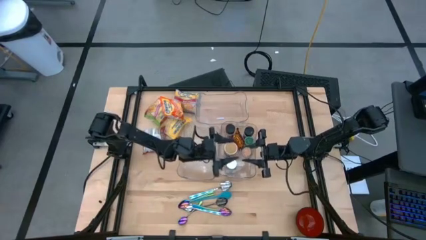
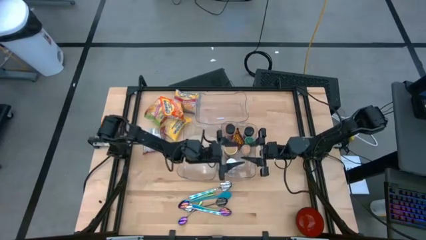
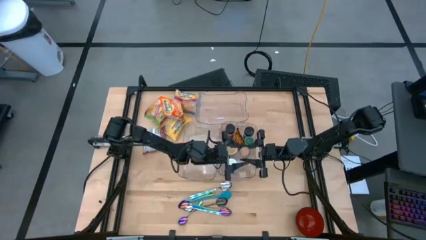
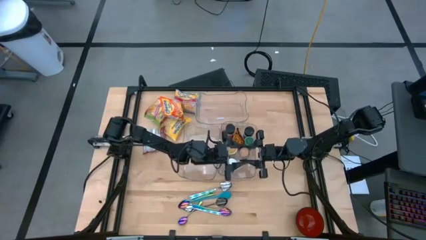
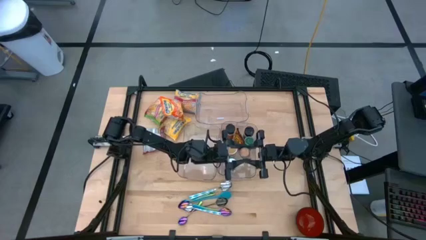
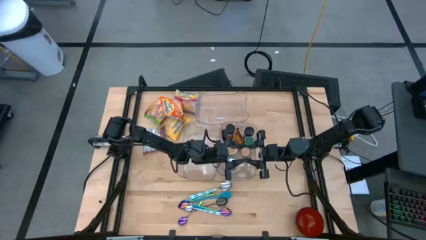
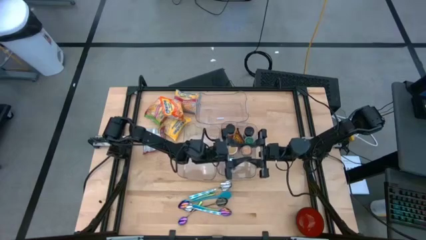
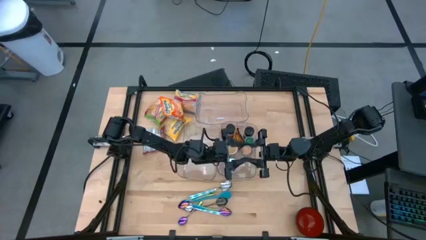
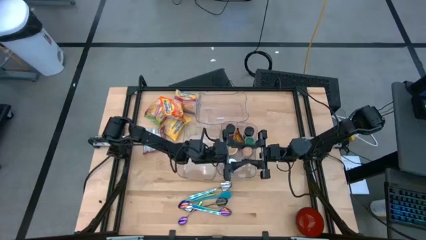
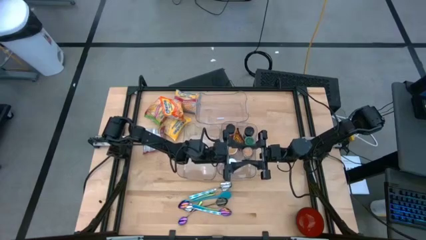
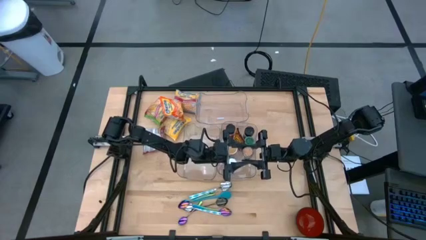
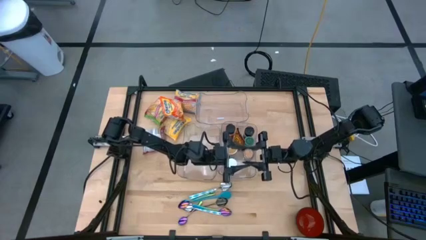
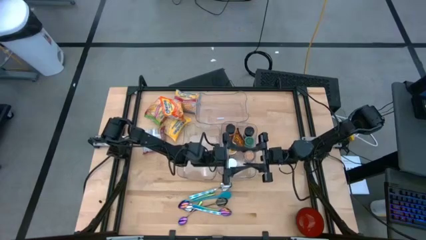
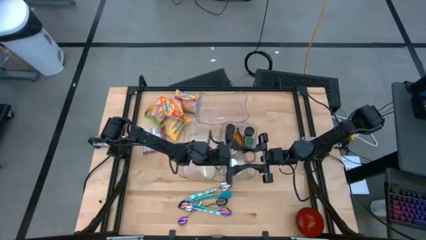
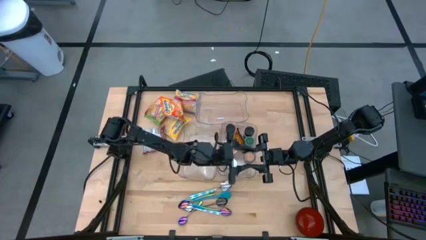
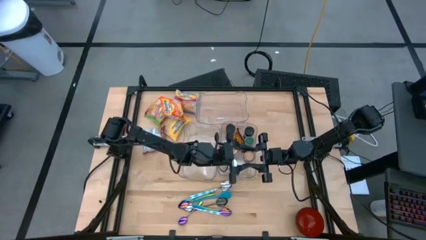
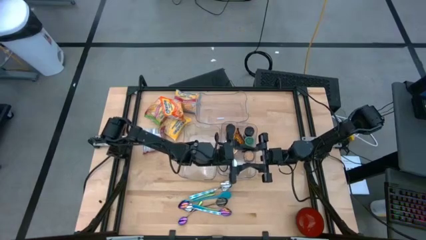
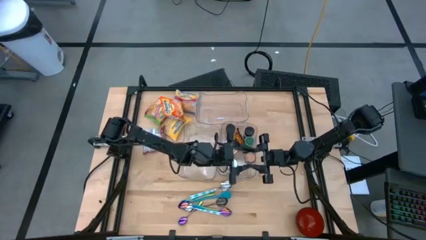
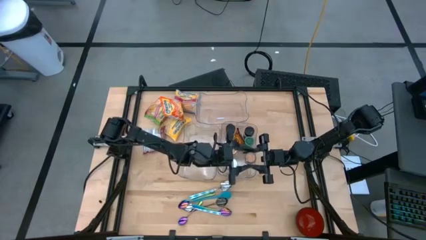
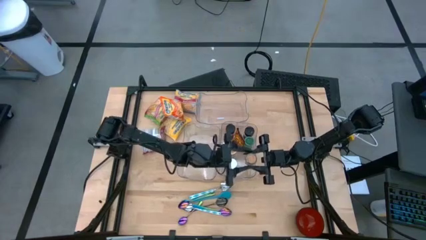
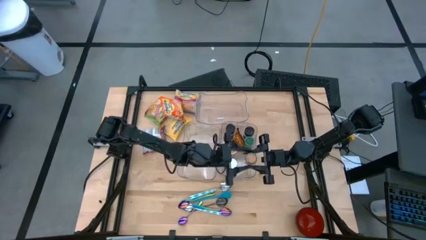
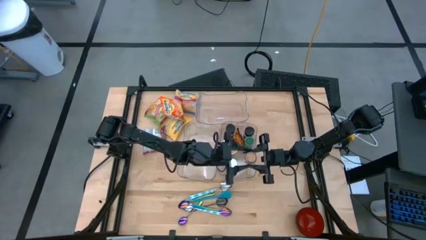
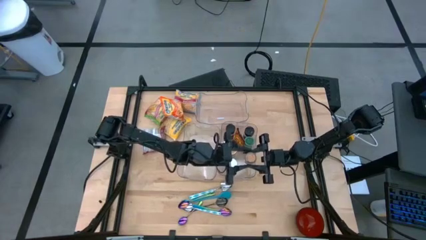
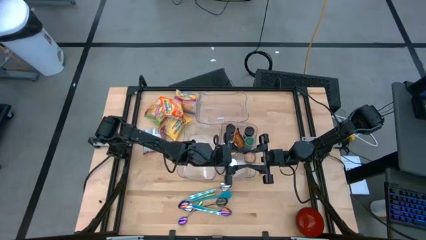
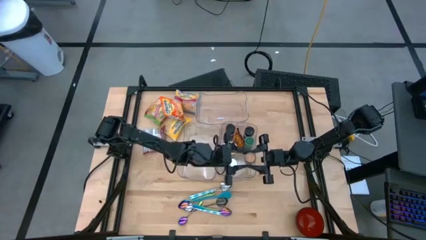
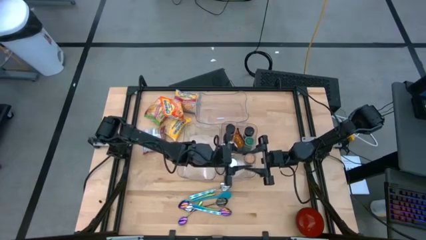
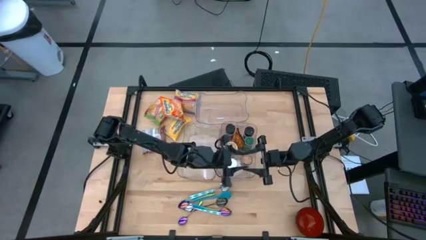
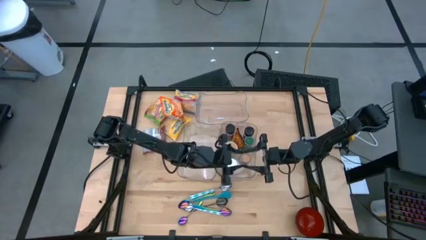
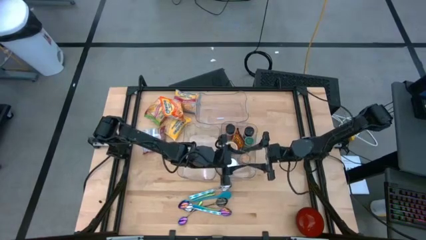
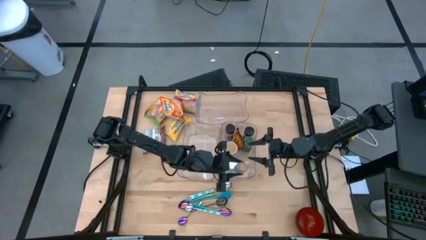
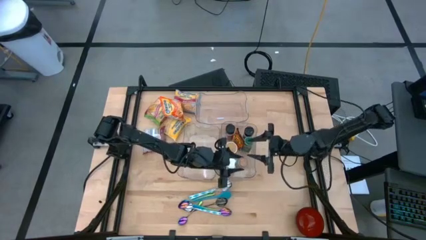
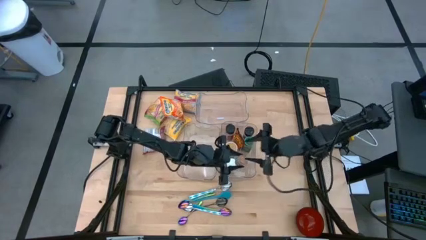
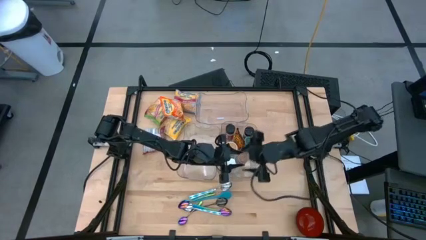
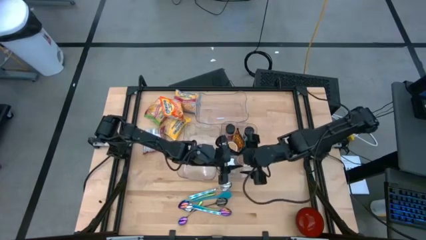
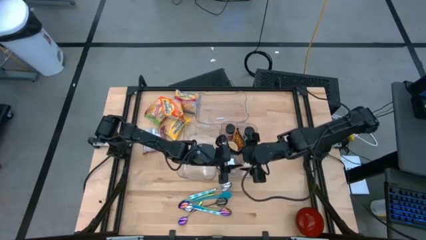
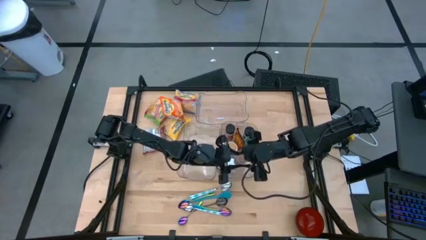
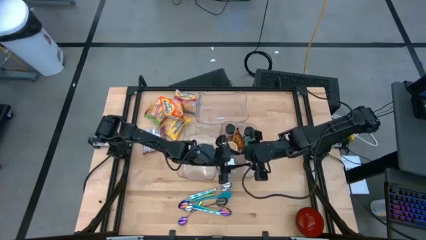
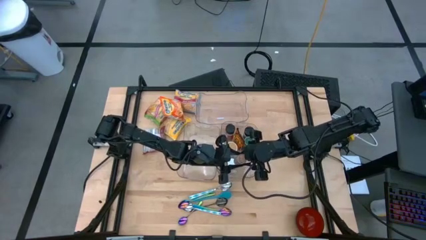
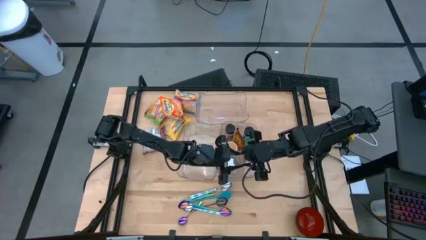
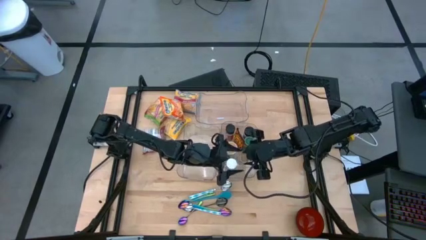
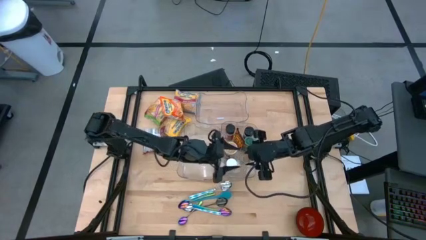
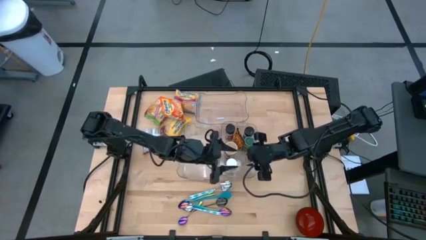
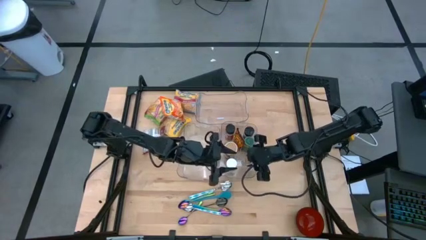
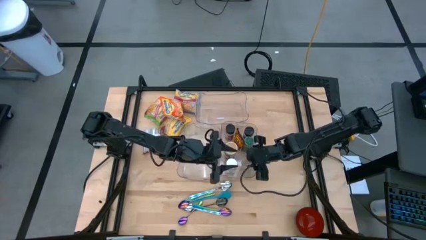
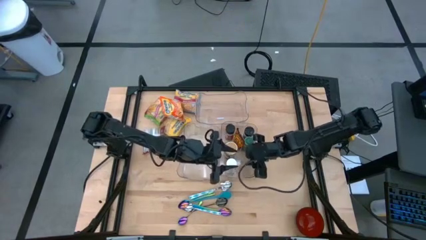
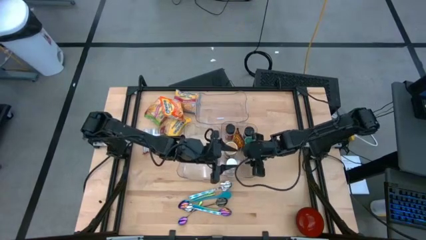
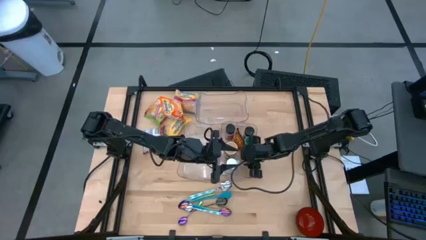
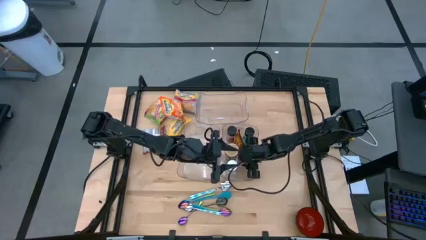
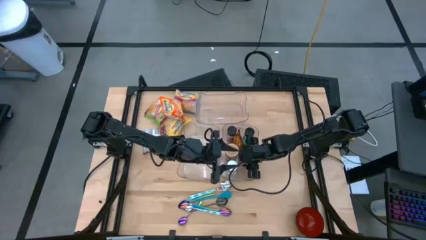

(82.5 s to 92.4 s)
Task: Pick & Place Food Item
Put the brown seasoning bottle into the bottom right transparent bin

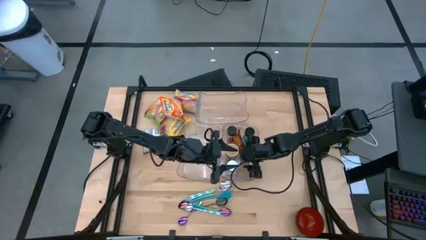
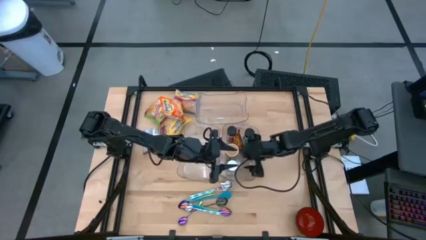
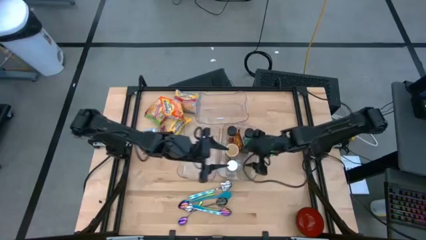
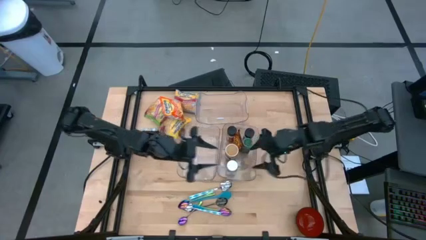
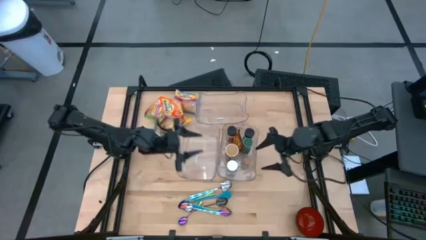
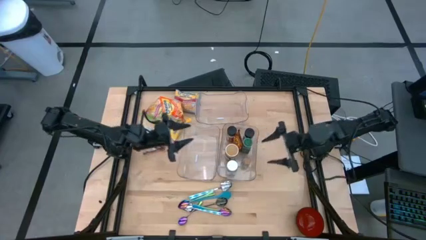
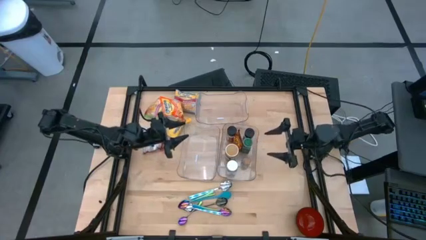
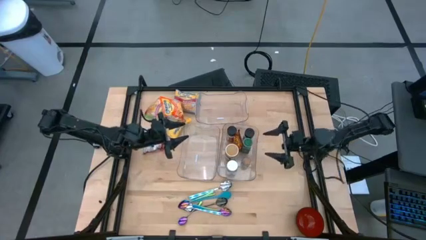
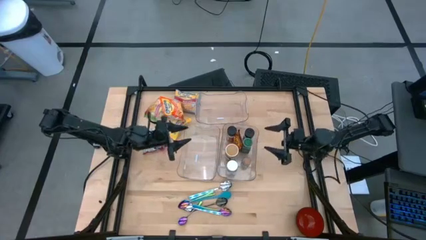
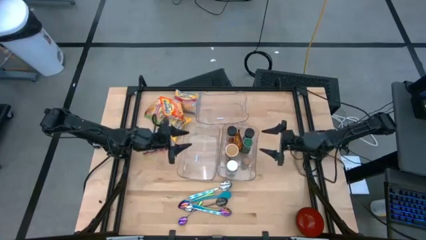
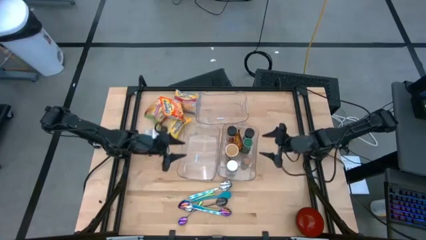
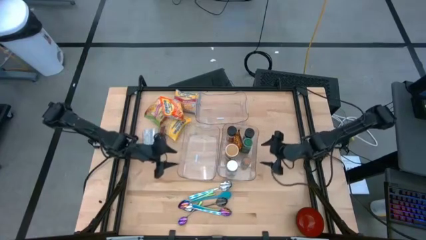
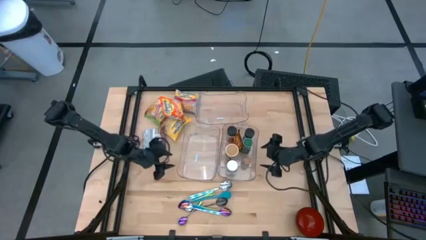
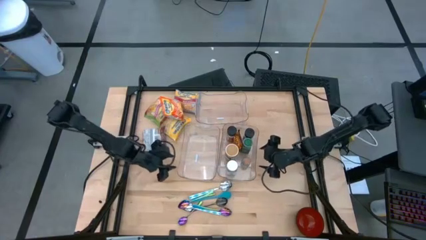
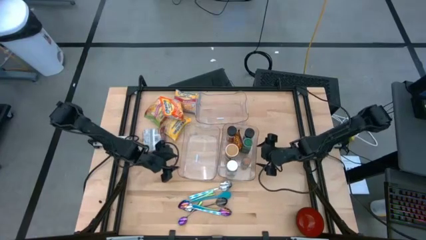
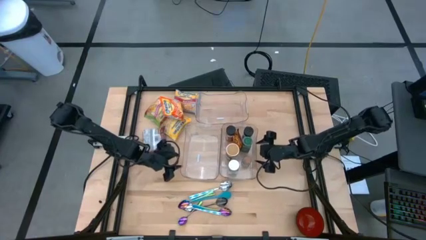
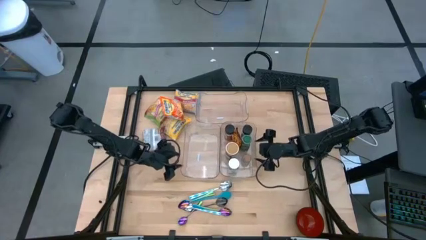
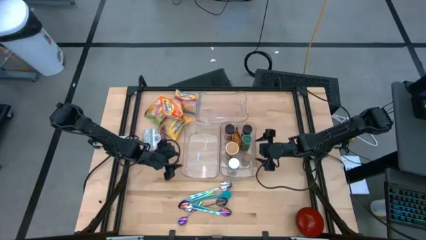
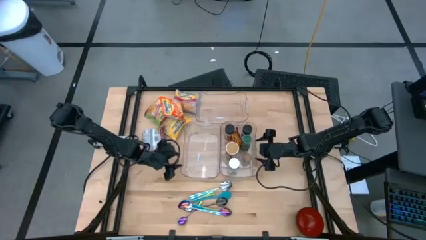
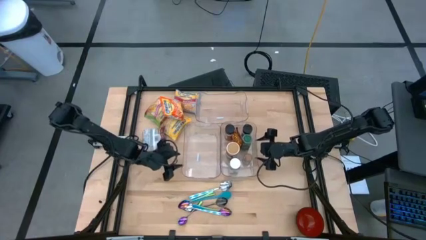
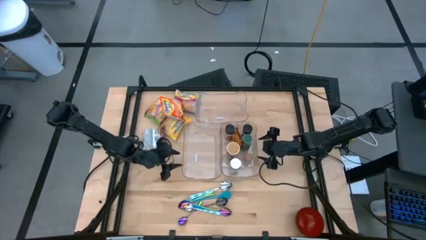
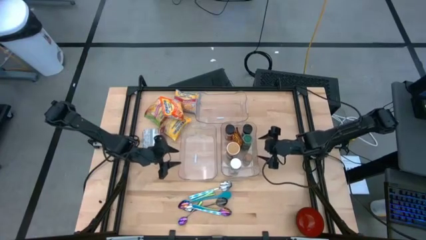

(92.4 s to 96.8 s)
Adjust the transparent bins

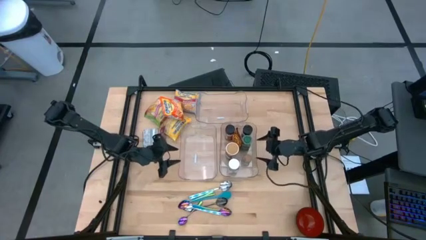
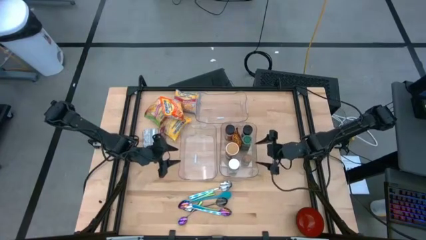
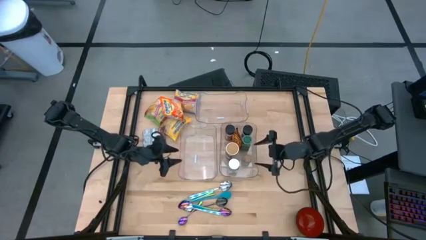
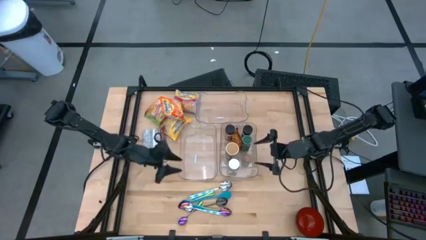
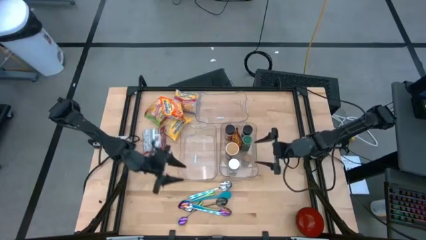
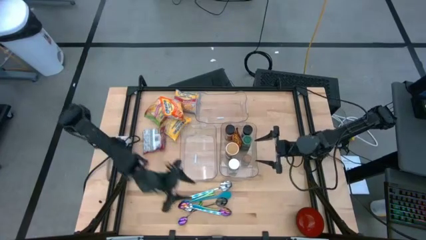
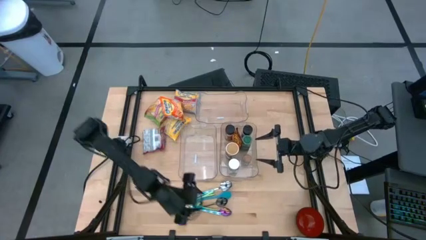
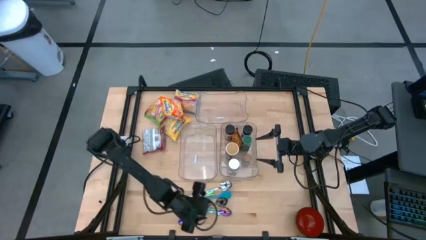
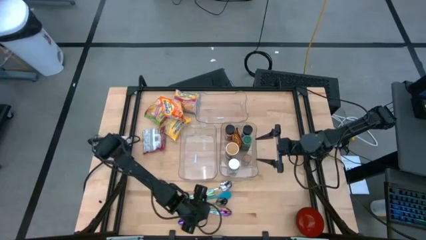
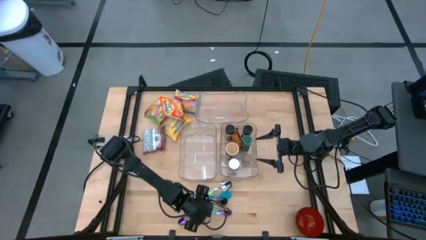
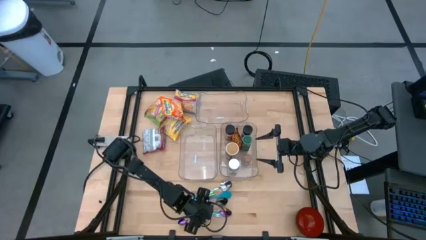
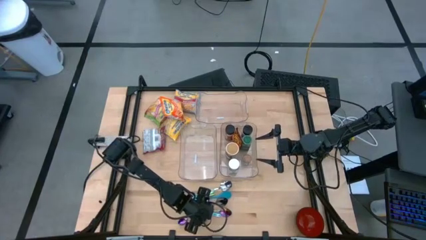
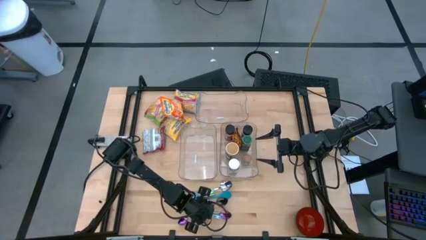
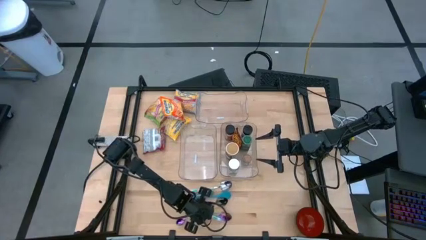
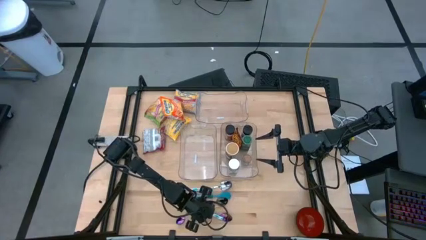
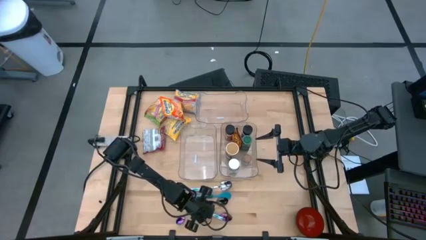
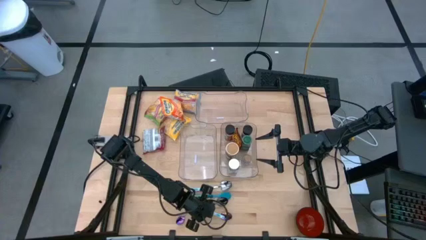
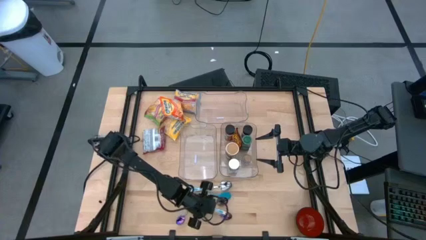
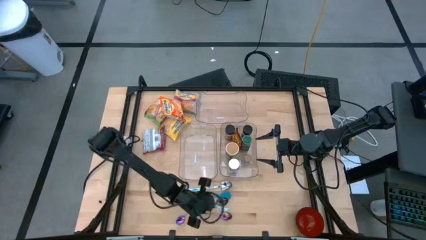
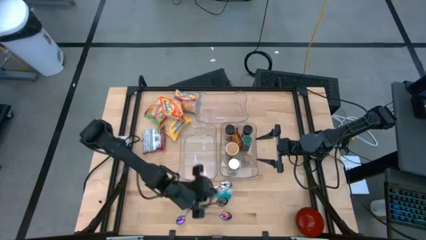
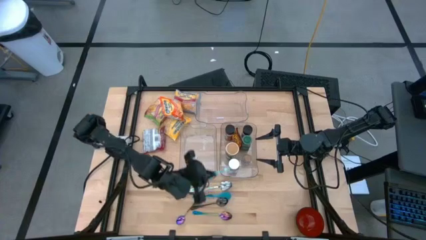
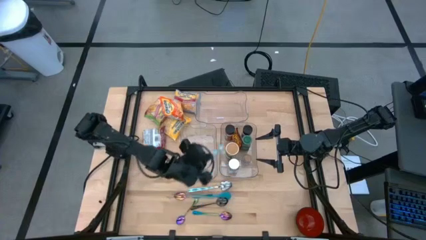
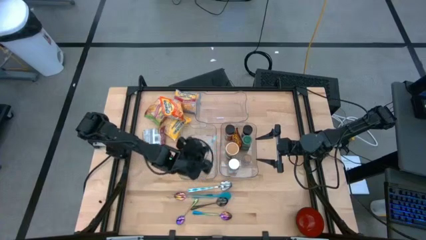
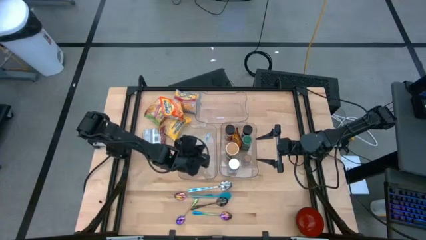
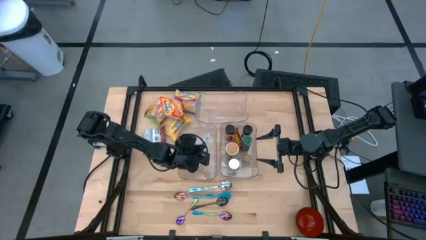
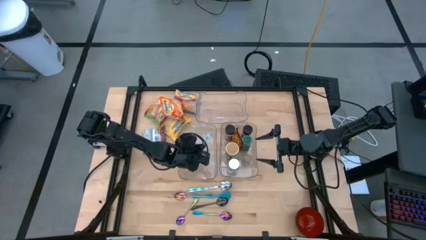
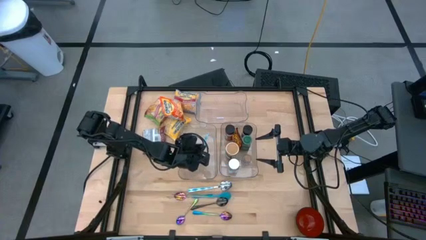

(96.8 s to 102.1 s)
Put the blue patterned spoon into the bottom left transparent bin
